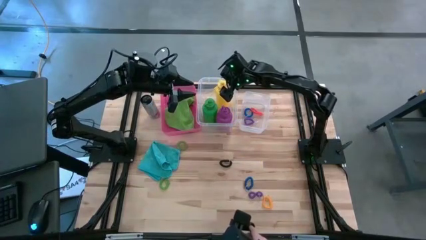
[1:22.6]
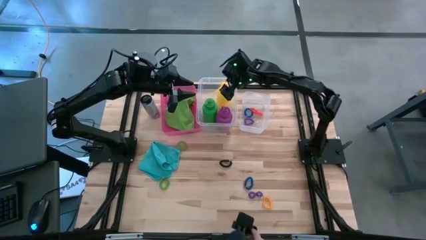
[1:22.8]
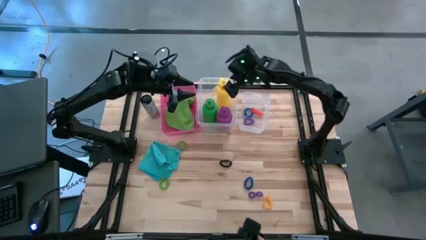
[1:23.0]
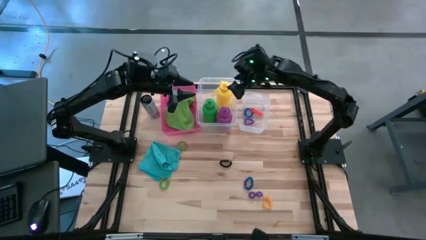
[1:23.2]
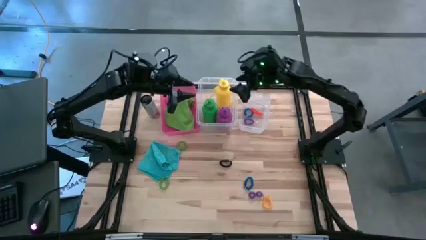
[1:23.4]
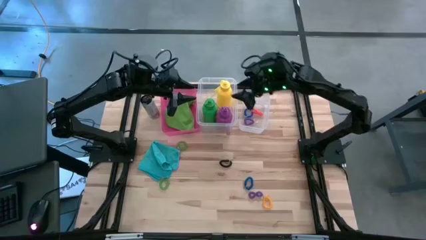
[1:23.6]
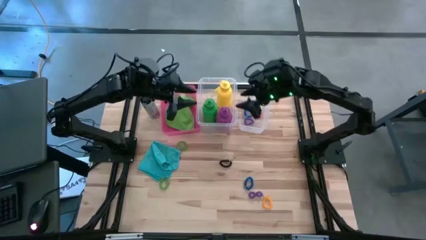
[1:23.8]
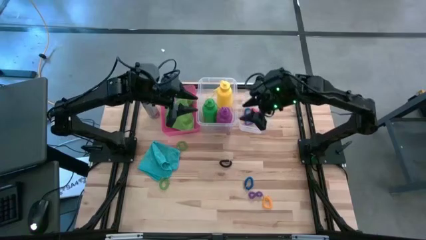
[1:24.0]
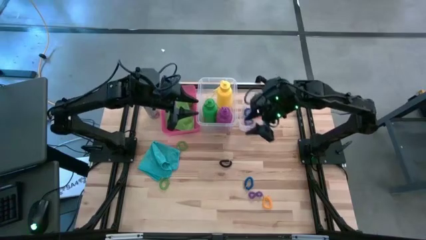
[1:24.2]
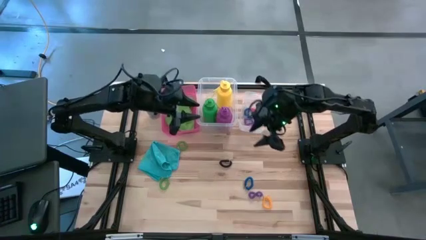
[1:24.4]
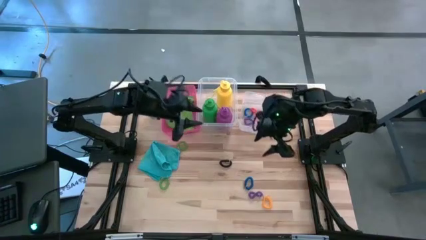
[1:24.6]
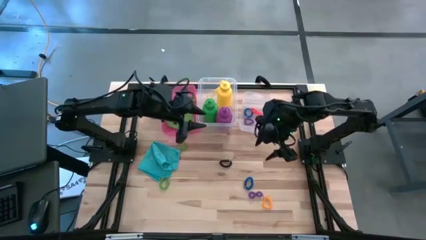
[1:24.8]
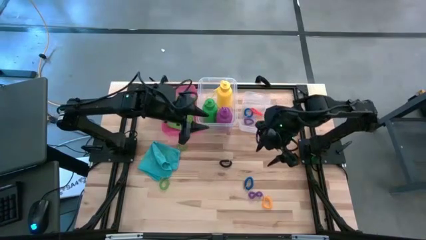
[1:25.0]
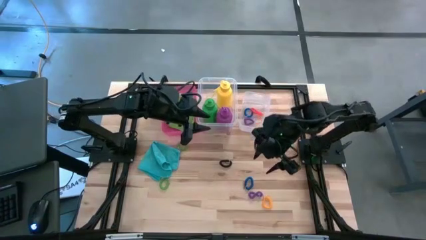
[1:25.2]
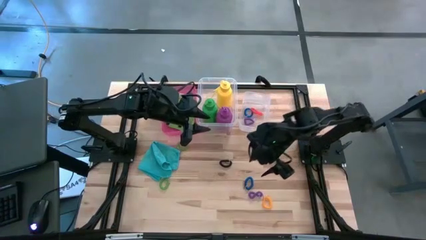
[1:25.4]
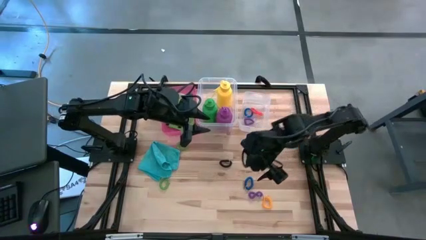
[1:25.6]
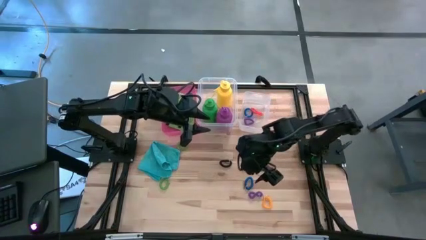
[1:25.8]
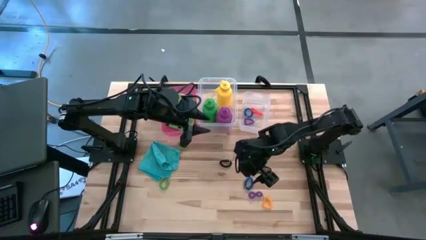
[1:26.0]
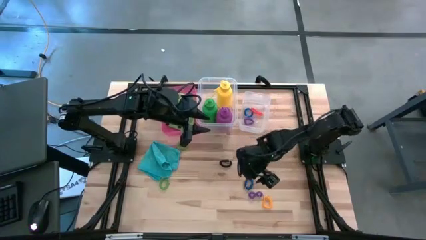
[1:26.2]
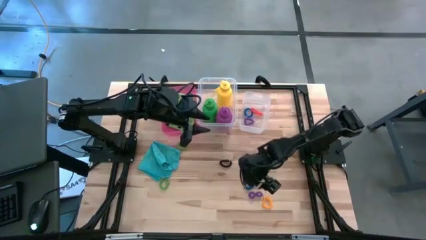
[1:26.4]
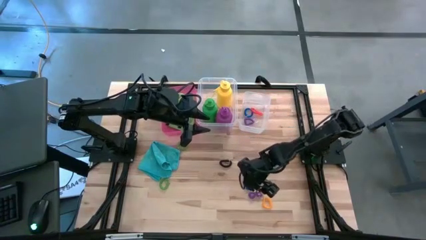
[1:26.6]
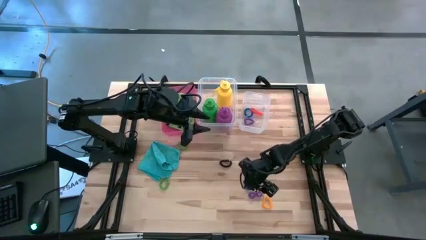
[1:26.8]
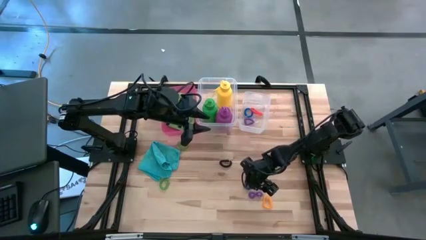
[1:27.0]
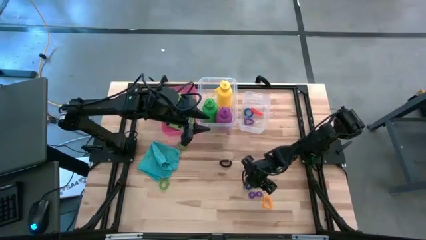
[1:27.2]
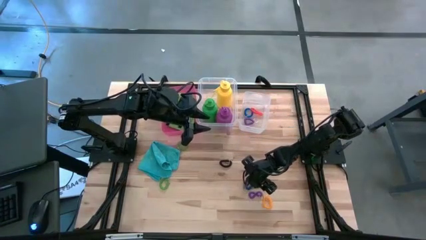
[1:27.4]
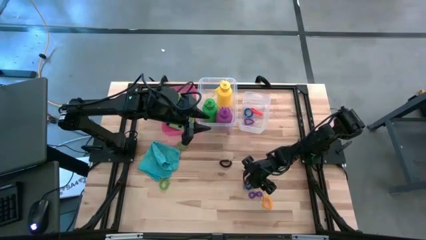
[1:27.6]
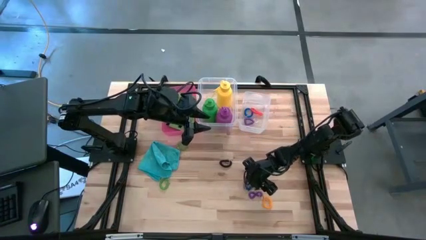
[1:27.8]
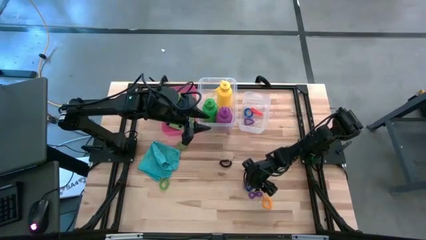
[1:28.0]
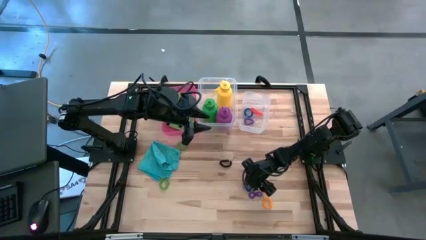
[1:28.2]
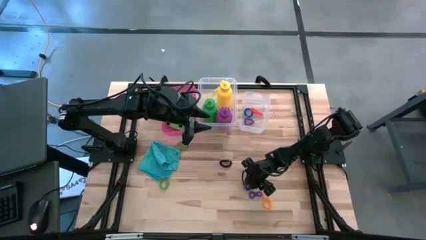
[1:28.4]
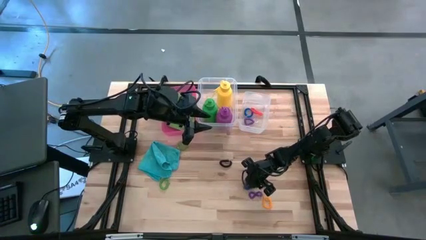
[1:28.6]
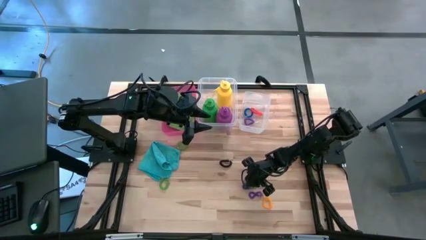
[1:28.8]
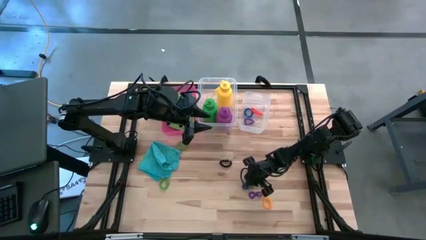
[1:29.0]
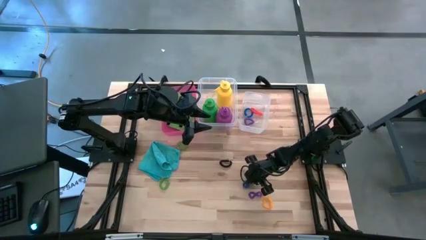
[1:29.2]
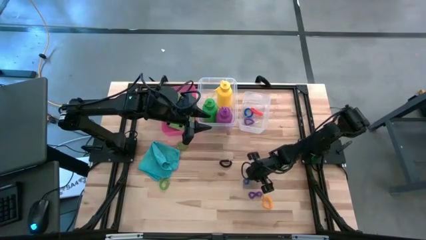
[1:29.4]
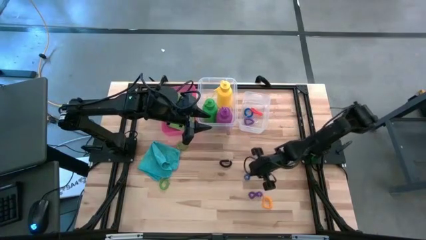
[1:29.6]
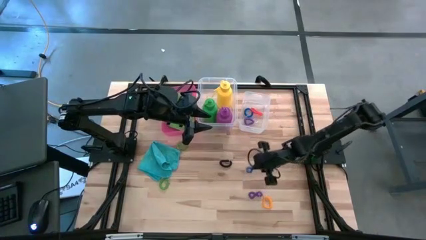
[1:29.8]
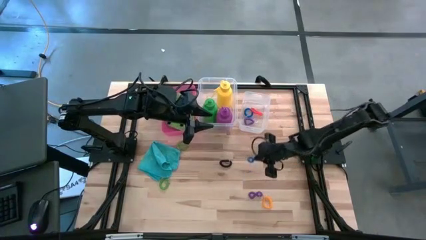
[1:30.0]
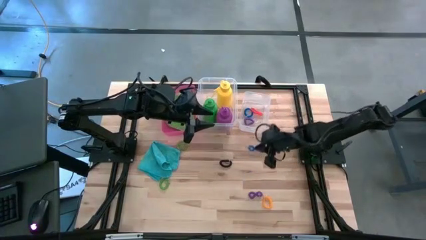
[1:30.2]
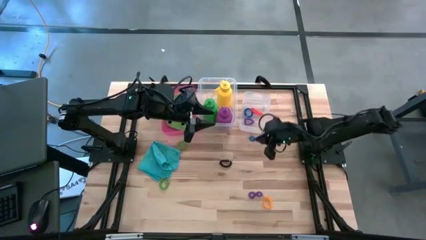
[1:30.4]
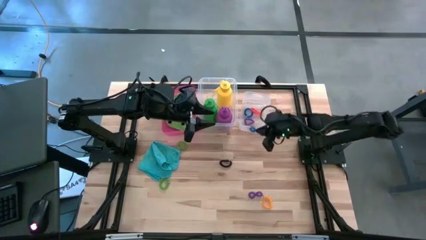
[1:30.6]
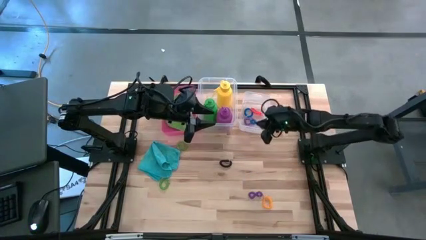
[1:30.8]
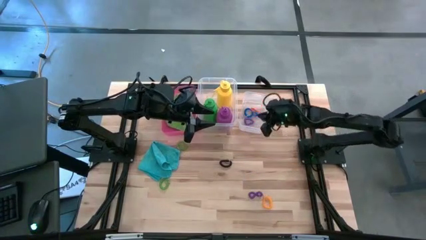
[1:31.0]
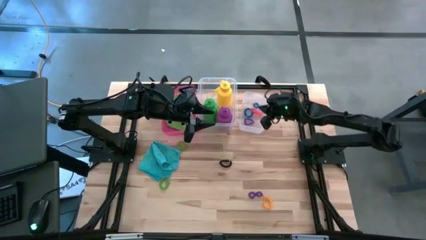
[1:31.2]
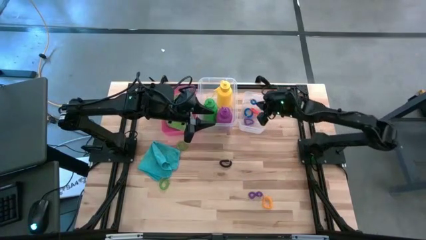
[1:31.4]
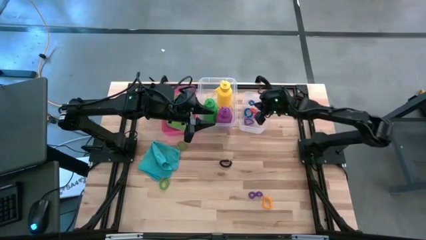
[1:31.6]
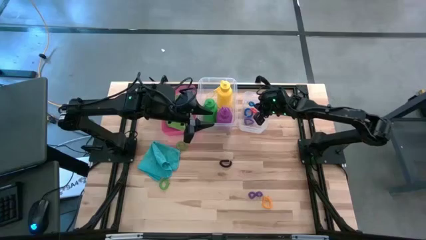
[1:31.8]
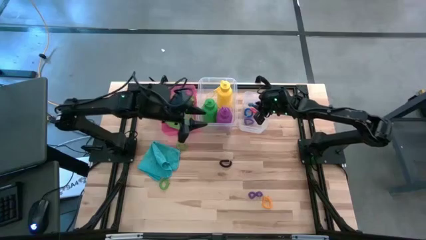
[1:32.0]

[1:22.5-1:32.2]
Task: Pick & Place Sports Items
Put the blue spring keychain into the right transparent bin

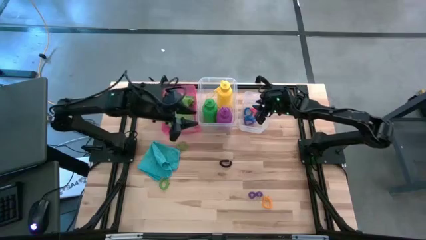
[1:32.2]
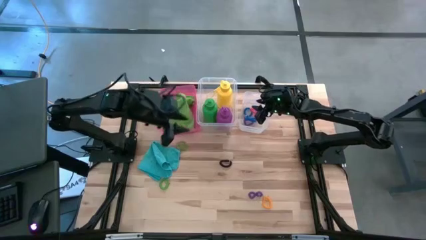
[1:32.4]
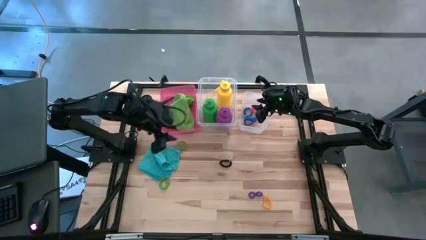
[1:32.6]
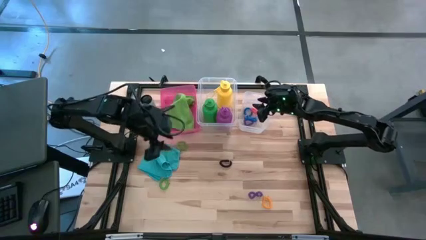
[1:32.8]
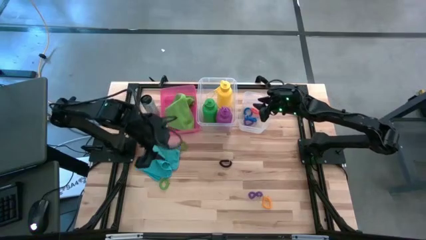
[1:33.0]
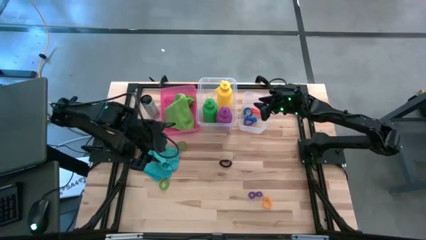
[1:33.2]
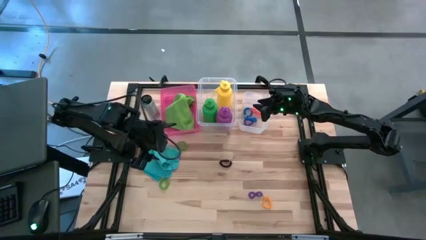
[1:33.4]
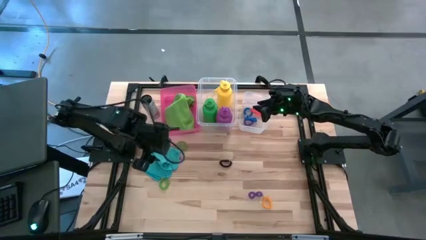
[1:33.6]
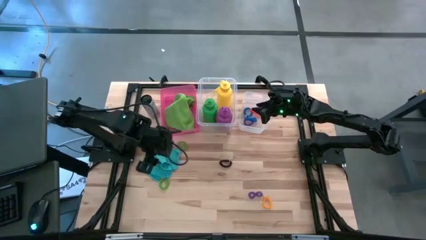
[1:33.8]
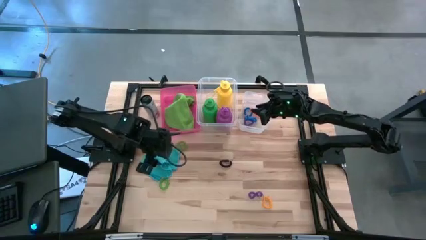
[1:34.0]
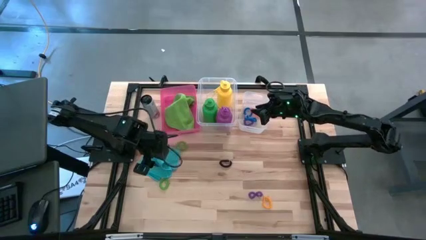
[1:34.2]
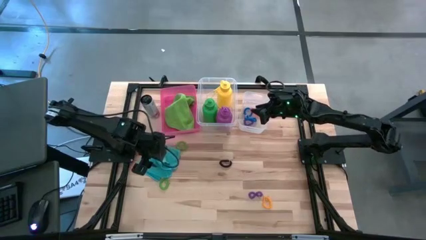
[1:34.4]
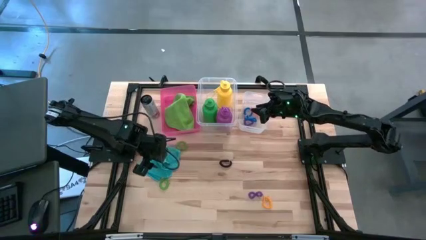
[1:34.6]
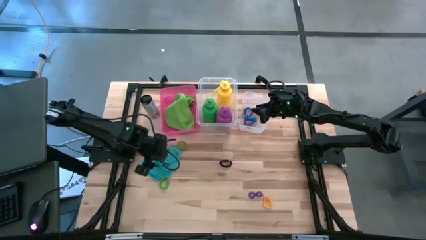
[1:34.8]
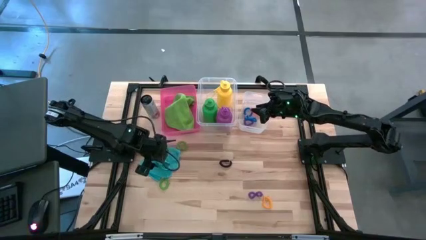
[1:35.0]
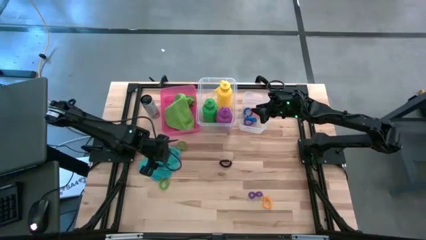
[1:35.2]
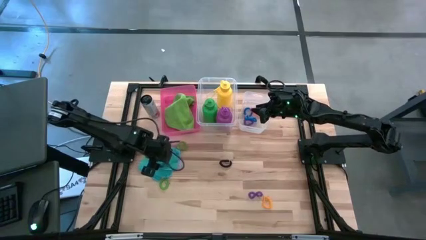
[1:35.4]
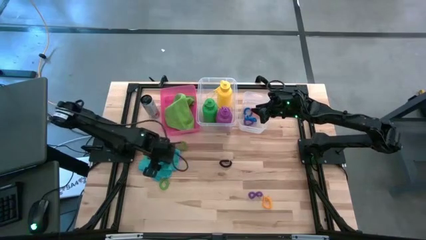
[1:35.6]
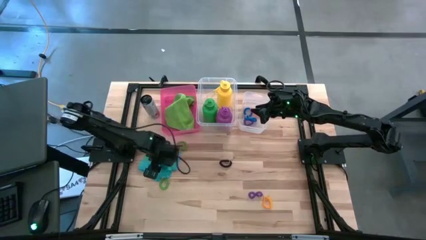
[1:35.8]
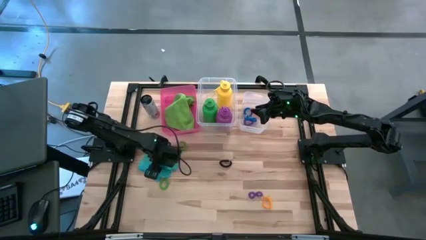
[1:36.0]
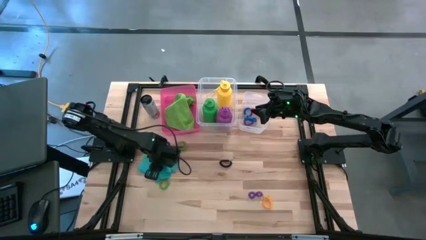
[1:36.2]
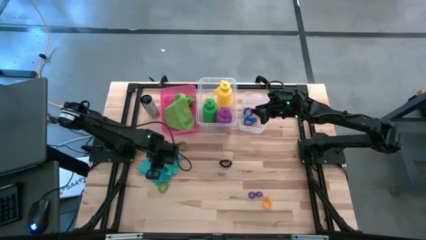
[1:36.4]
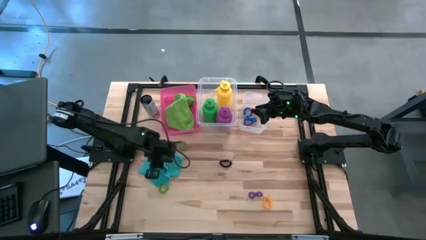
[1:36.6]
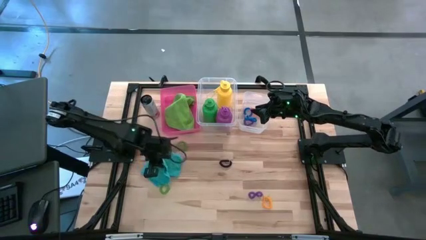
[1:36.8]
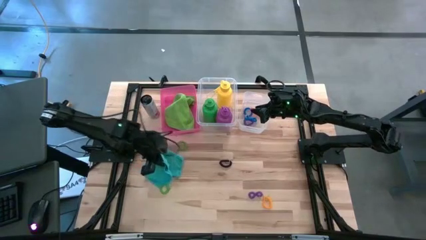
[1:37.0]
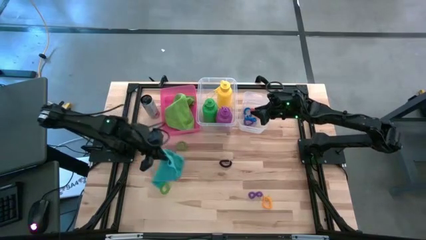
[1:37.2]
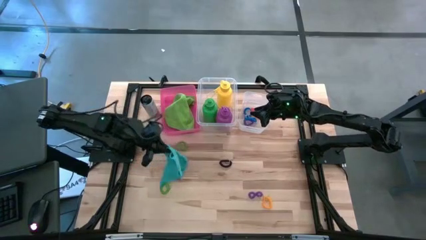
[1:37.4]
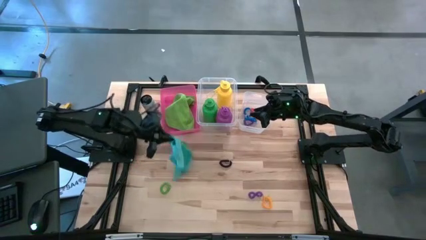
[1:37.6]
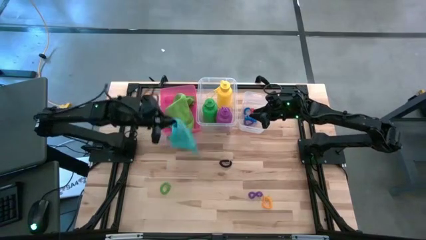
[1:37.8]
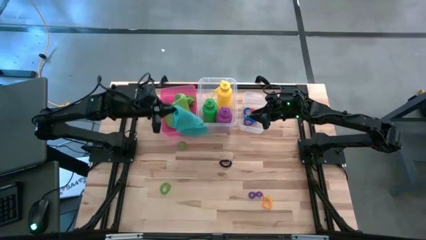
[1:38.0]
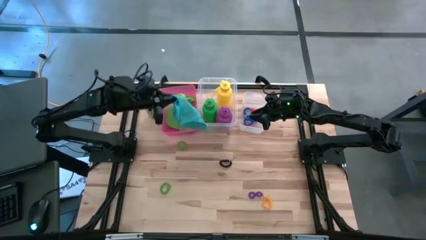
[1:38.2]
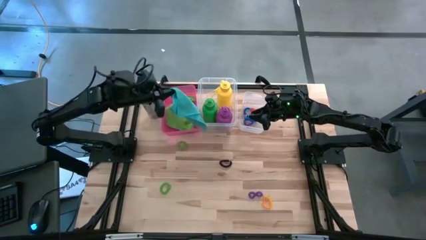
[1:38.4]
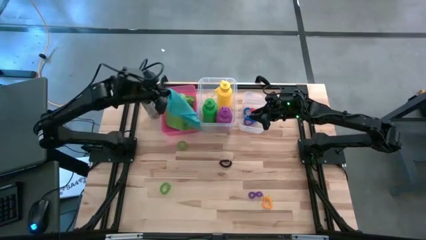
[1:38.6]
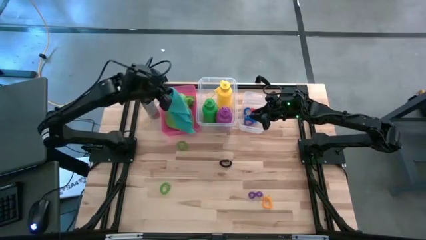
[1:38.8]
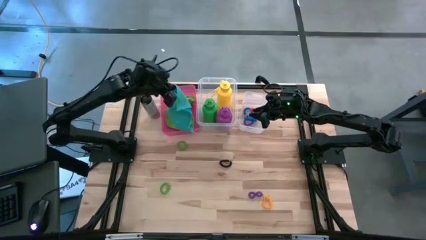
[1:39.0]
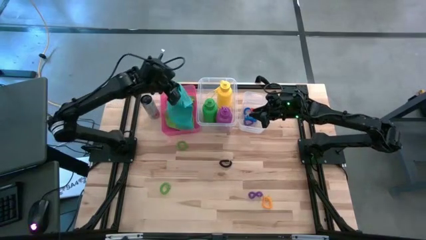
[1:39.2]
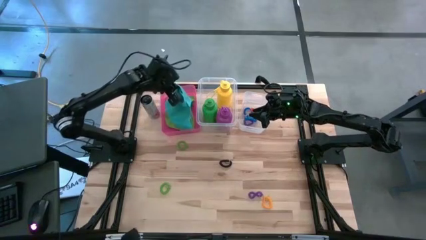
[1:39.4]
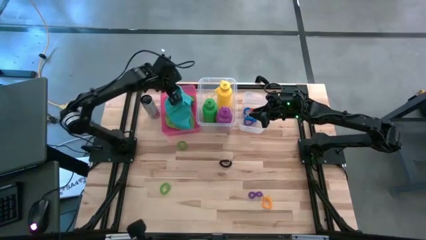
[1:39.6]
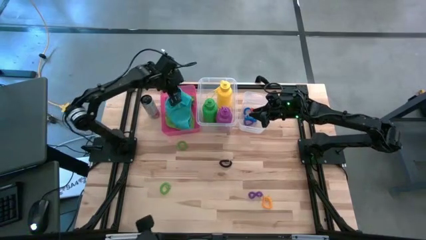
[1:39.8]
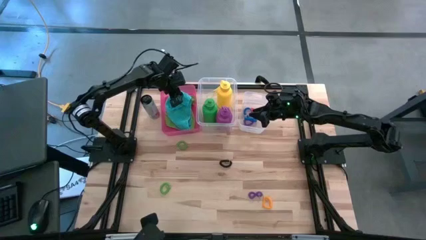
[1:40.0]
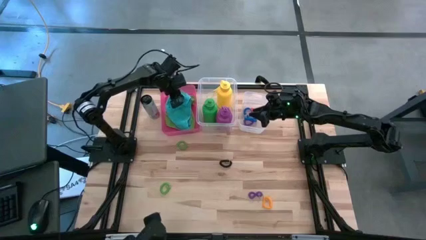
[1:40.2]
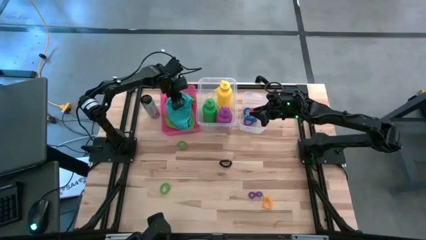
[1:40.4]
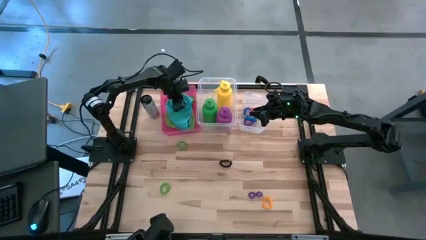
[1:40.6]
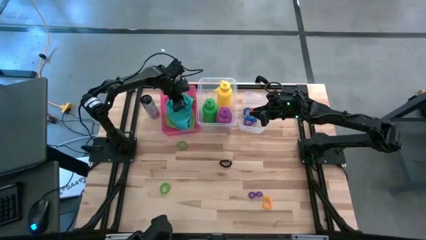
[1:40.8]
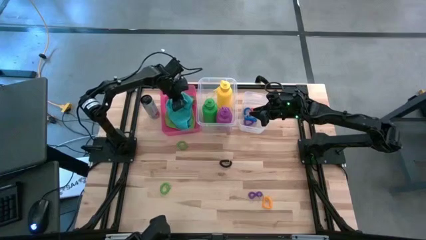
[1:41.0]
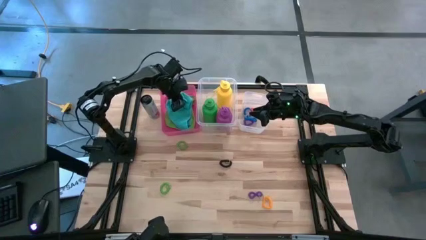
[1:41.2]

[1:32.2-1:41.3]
Put the blue towel into the red bin
